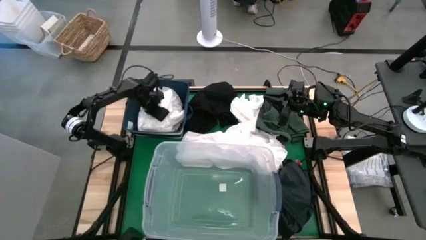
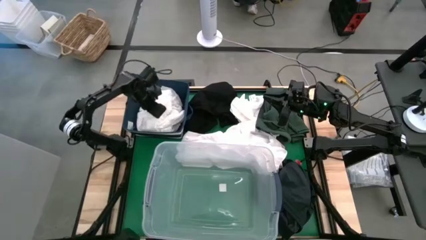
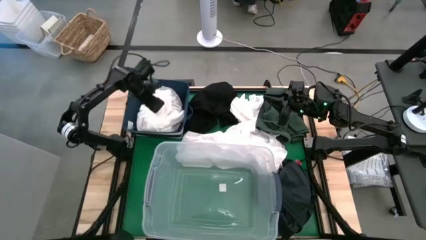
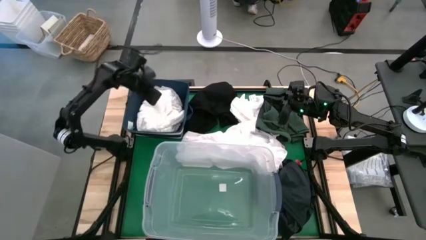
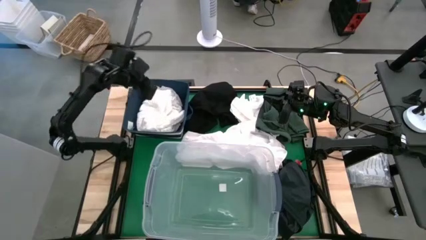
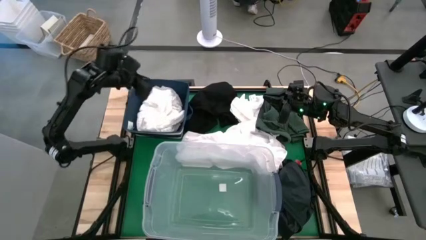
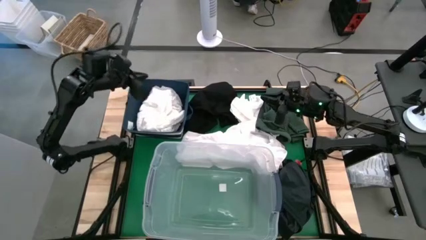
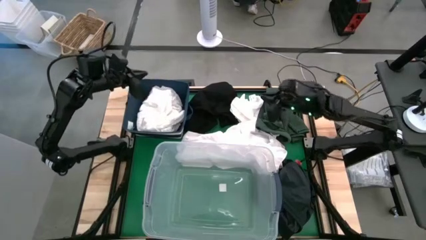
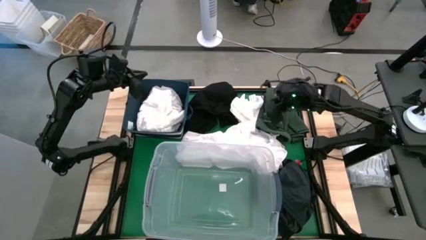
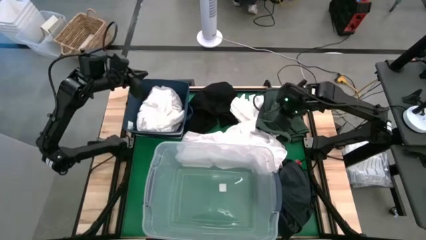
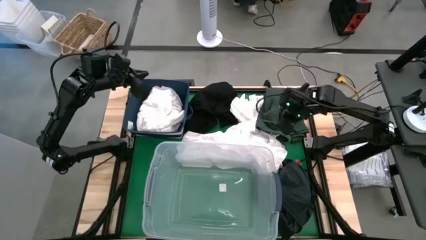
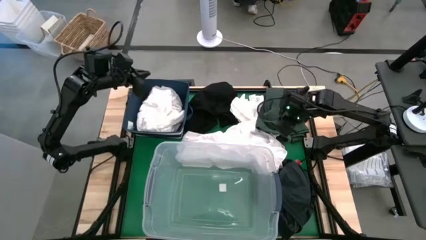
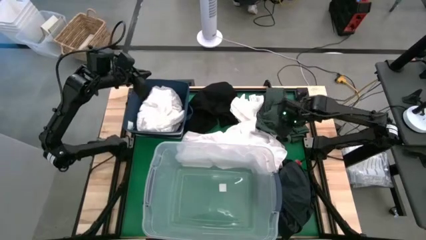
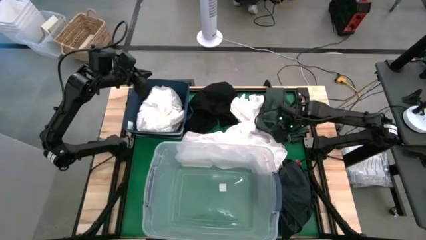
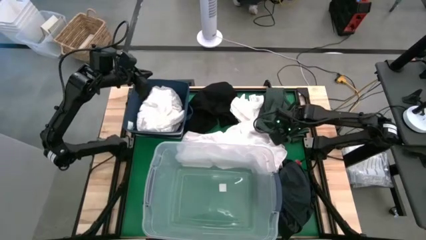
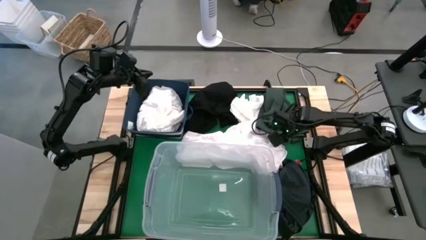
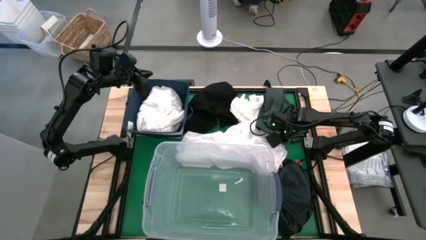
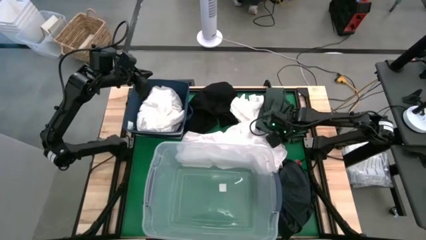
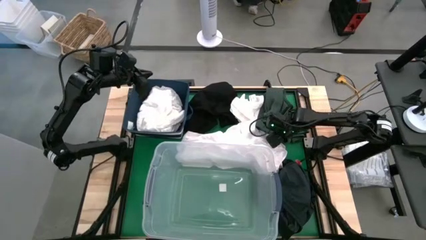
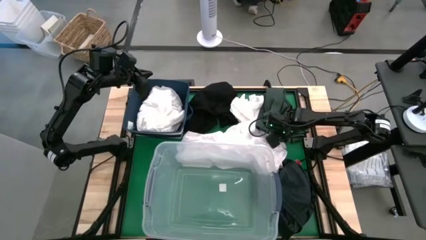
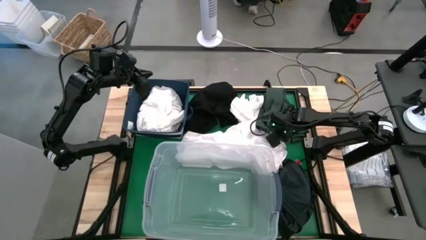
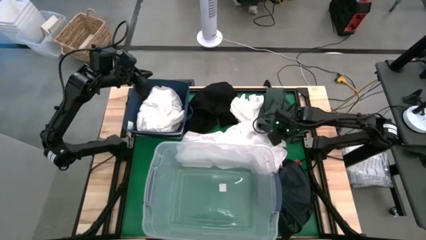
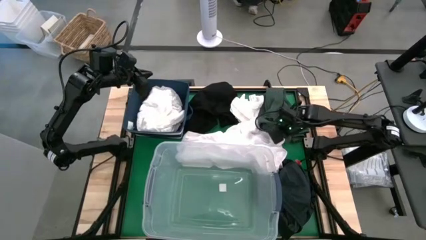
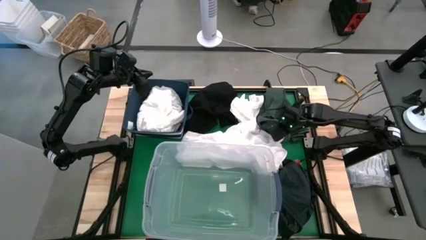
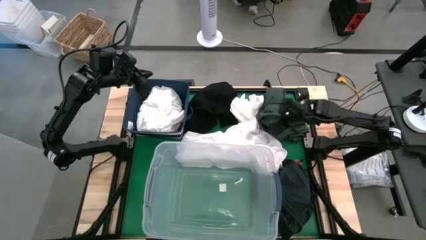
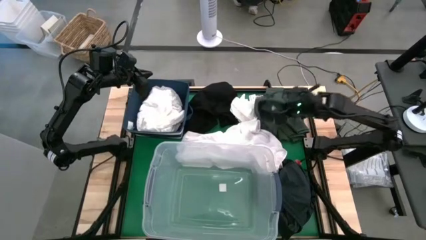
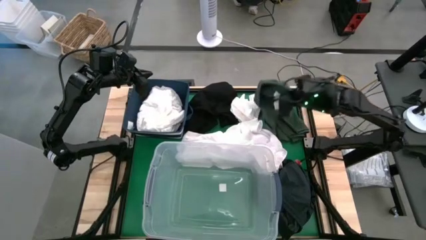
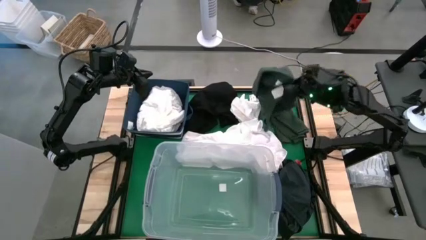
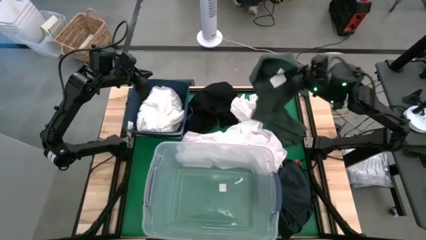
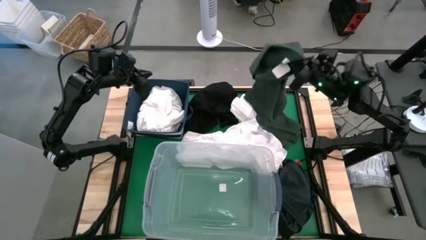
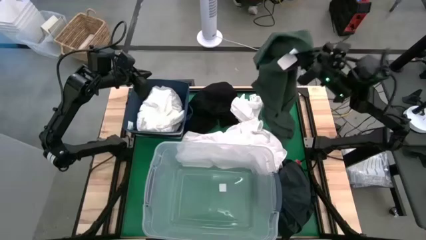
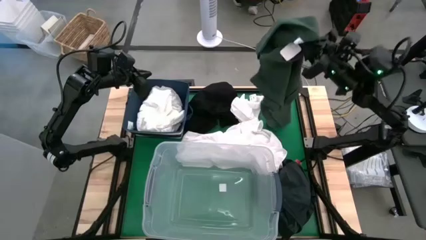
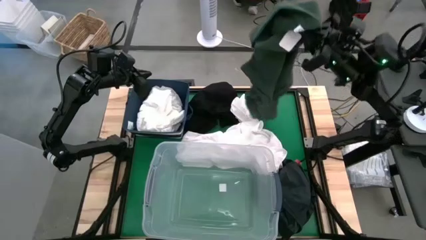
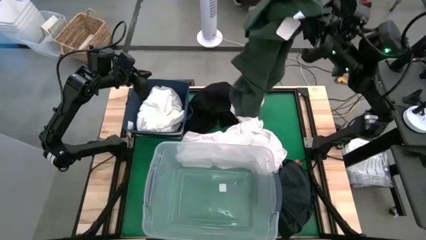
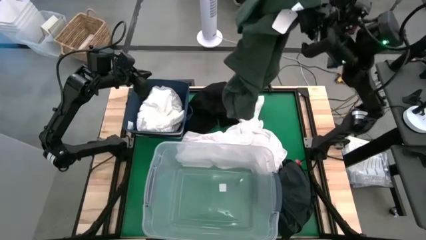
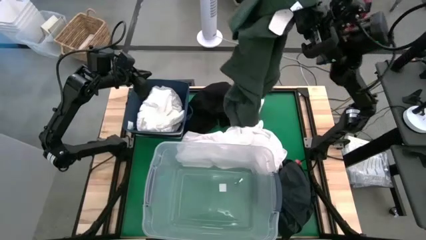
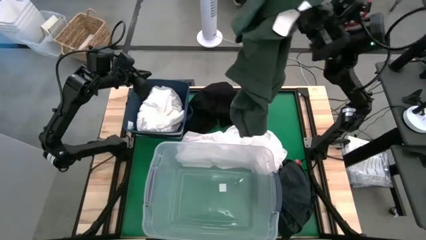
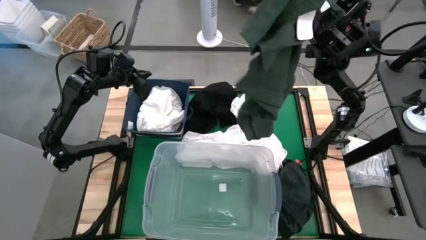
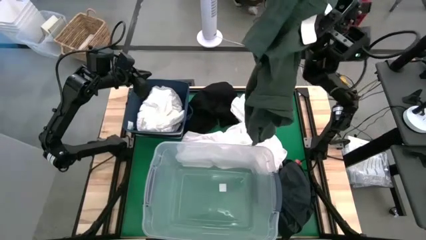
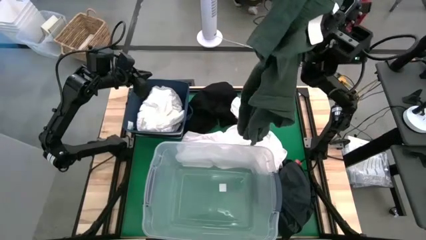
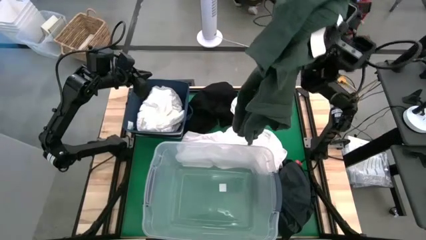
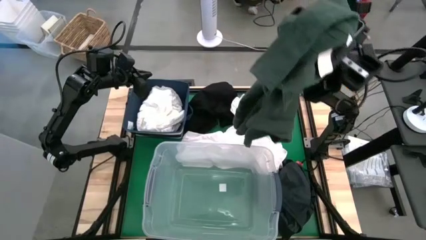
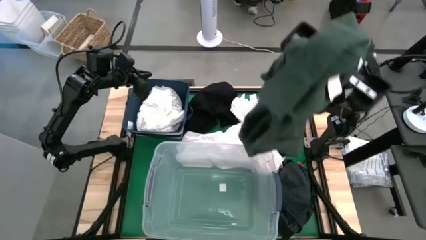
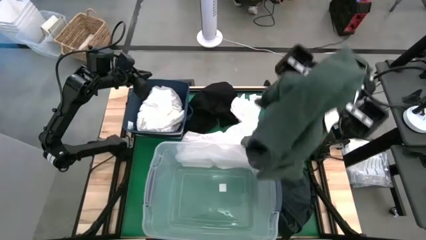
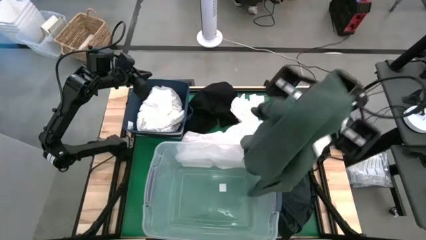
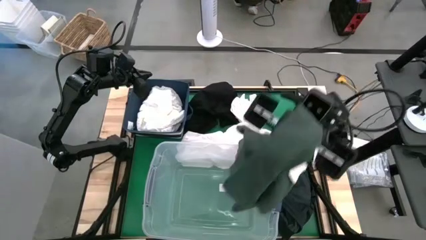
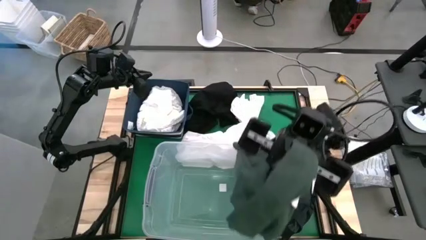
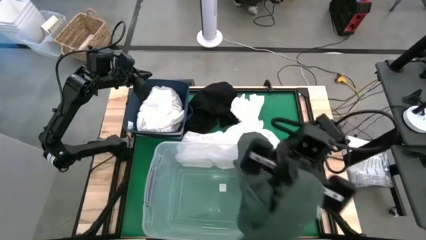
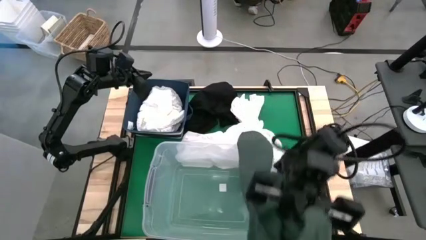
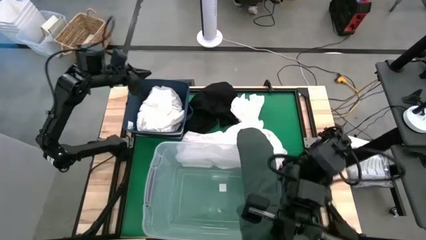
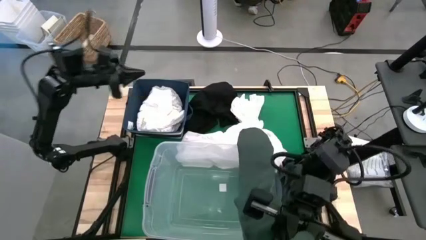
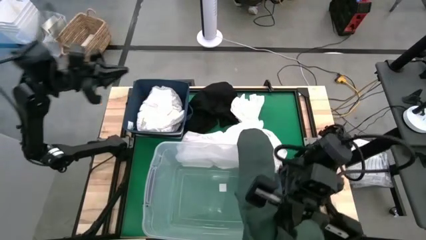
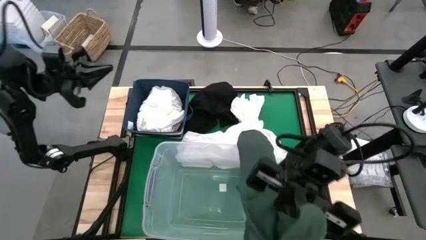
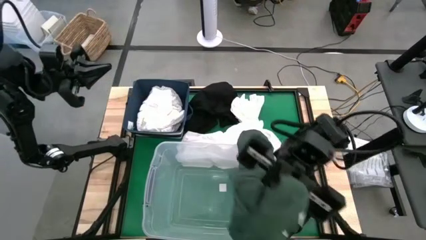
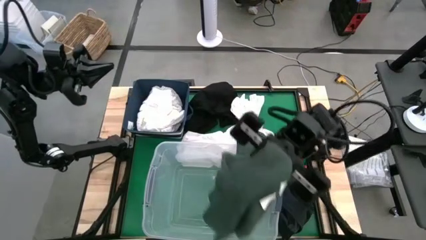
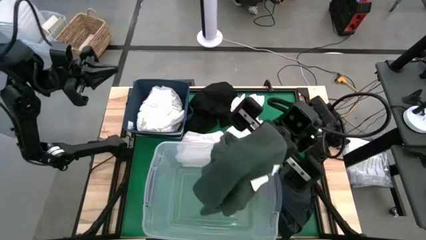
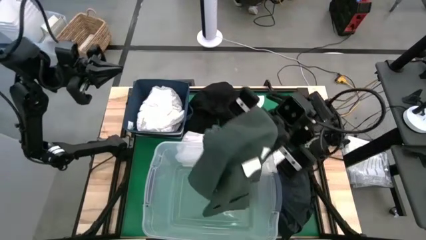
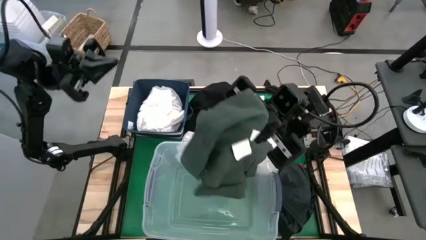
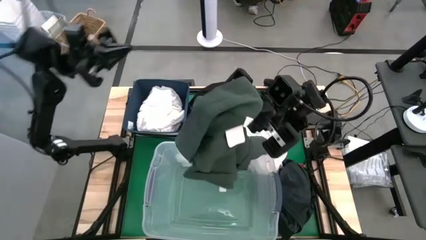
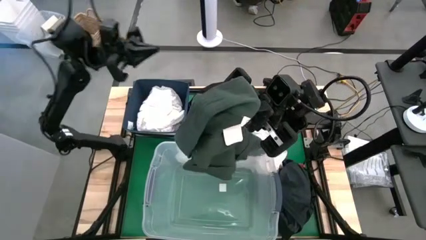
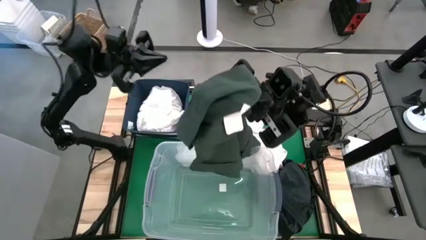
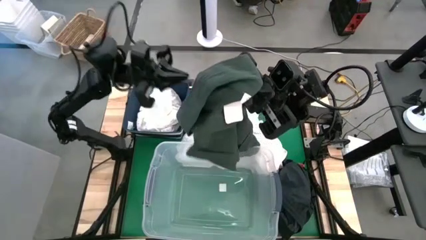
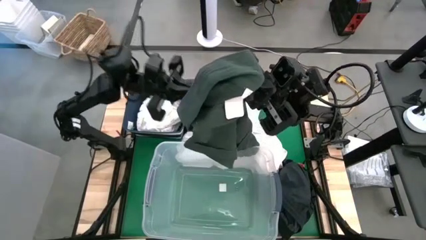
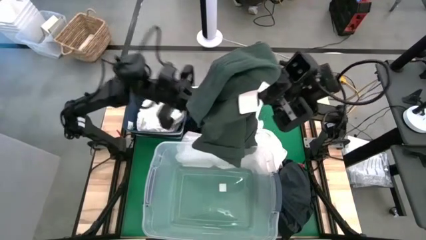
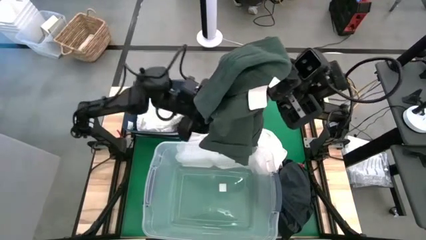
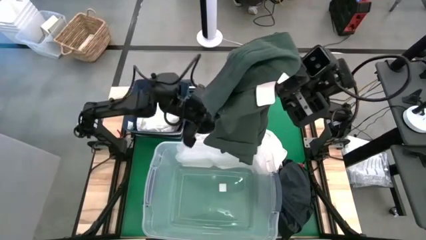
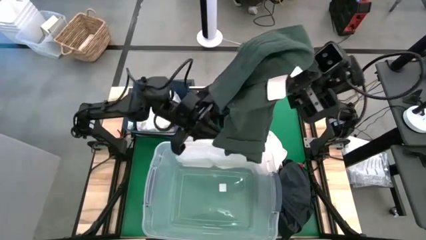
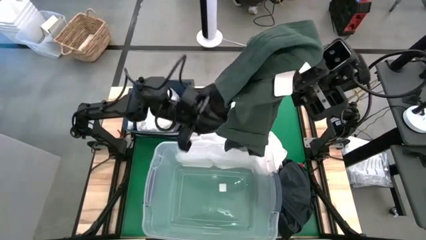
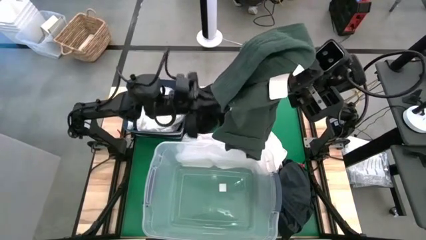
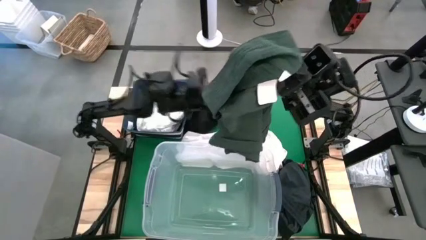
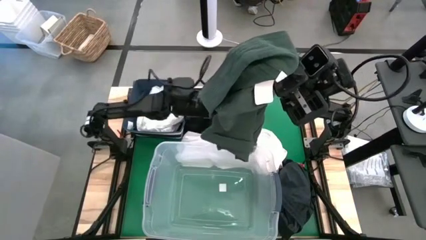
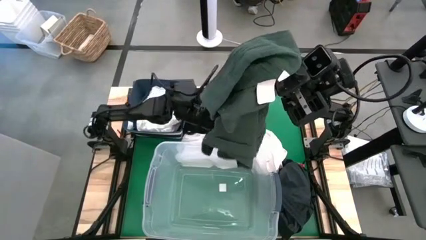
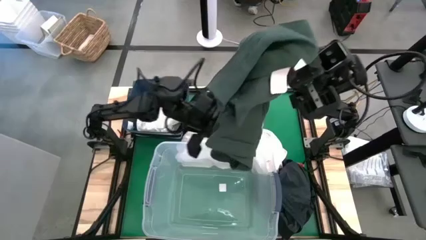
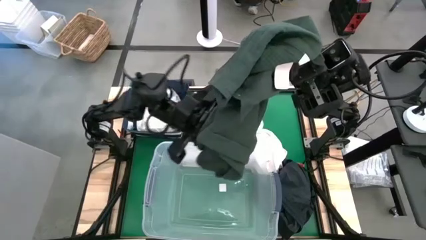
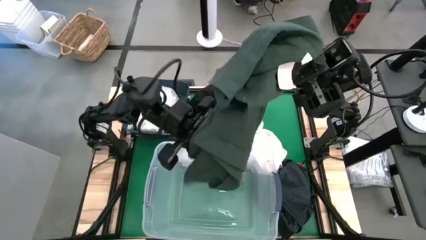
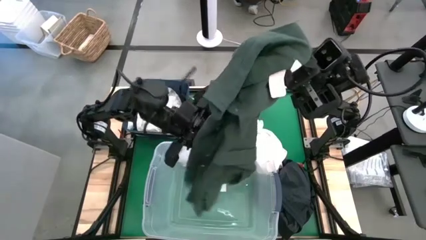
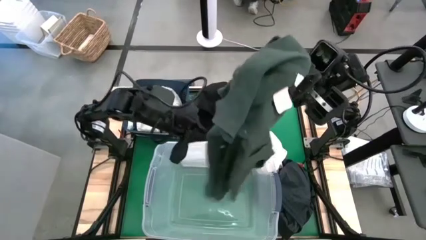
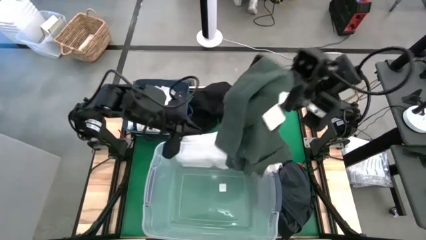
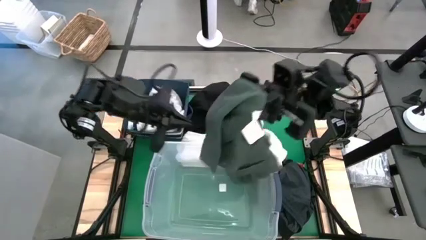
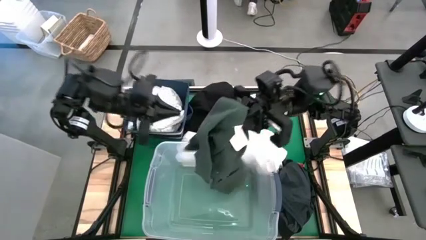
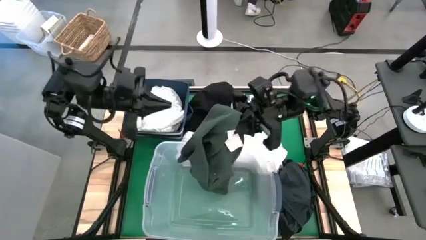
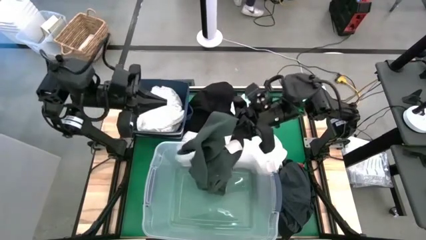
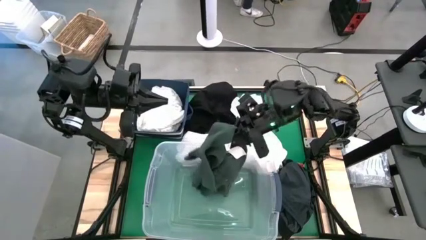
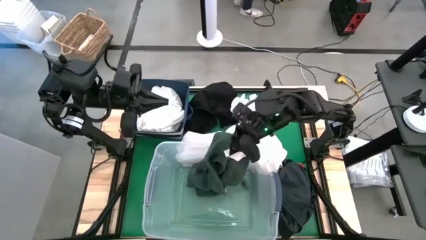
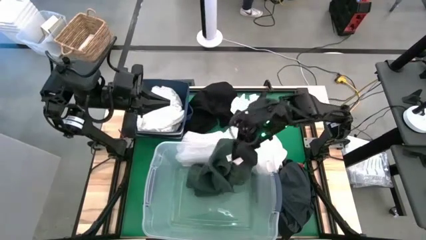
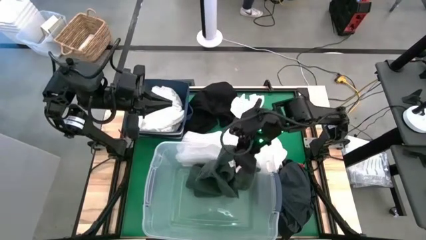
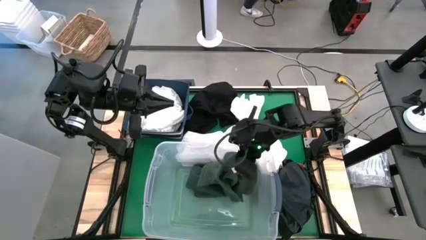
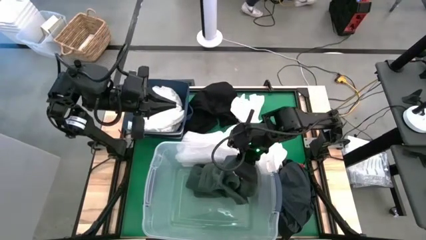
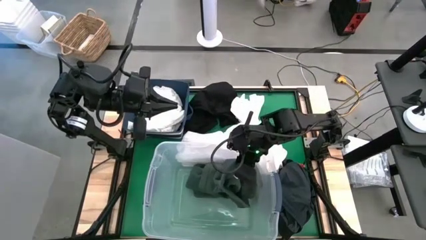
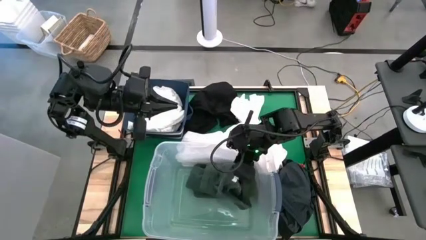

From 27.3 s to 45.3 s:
Put the green shirt into the transparent laundry bin
